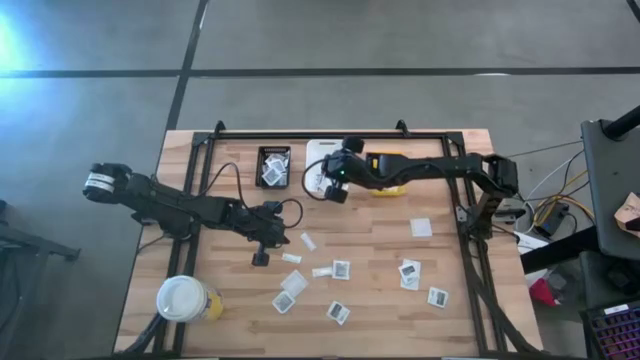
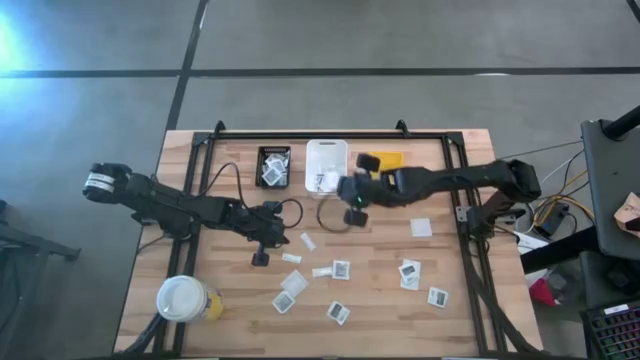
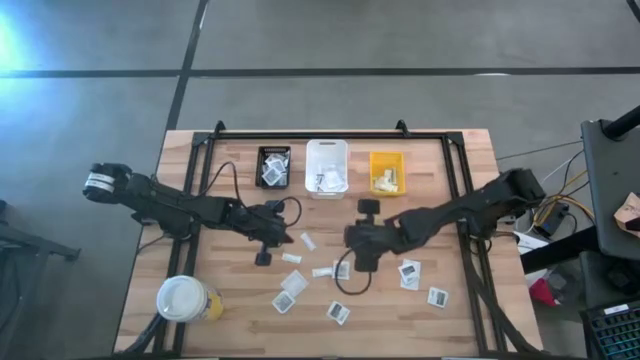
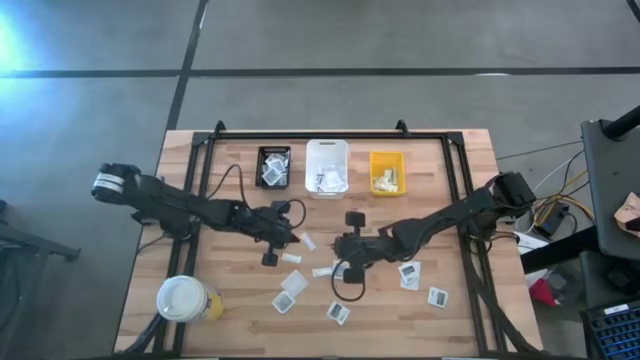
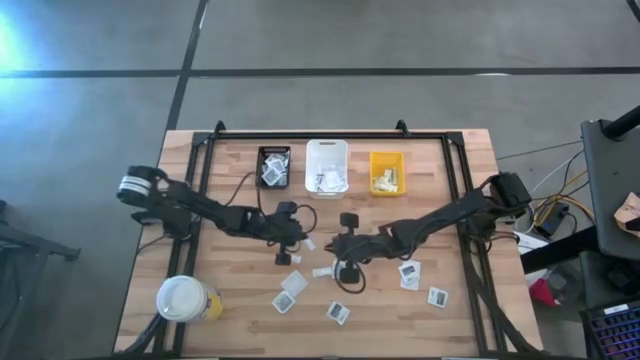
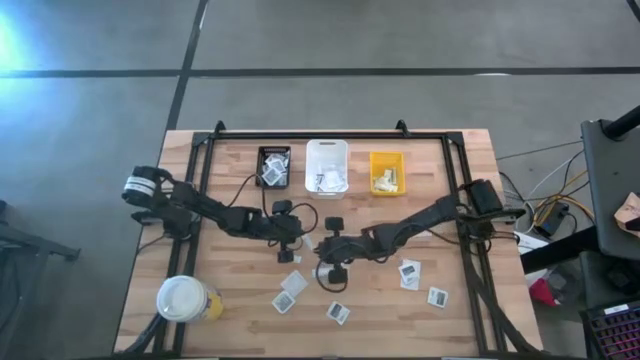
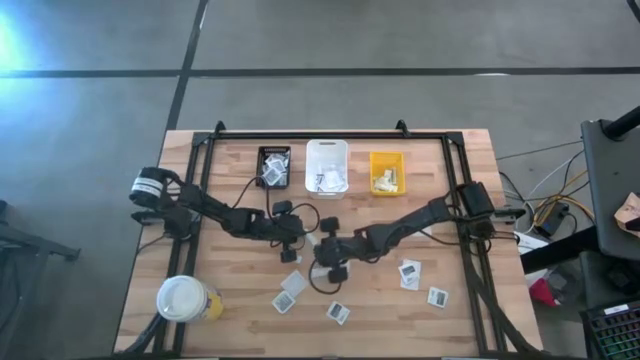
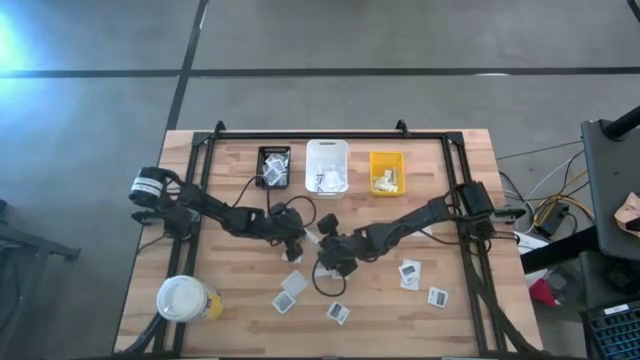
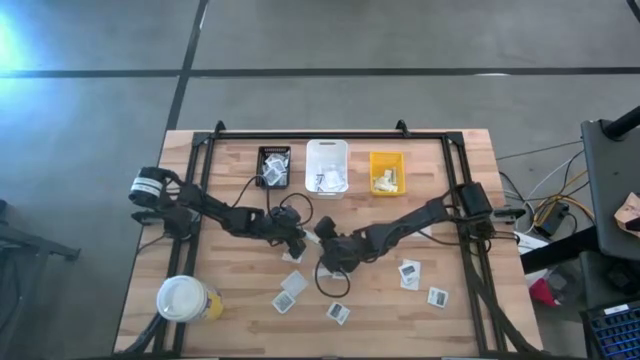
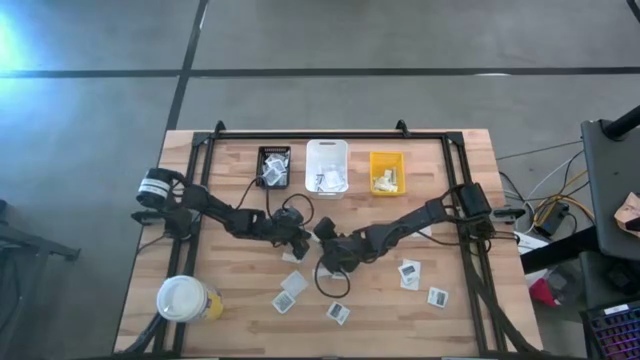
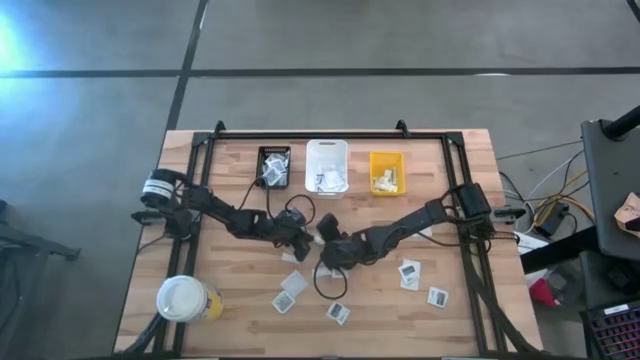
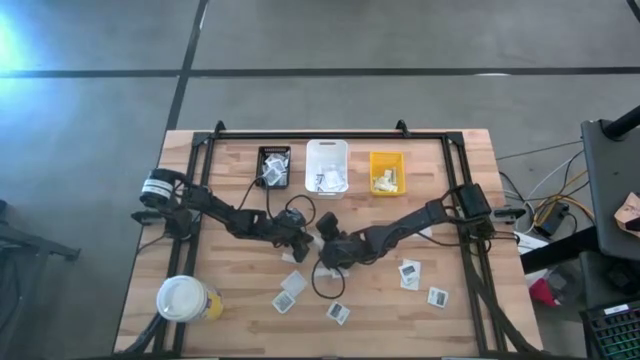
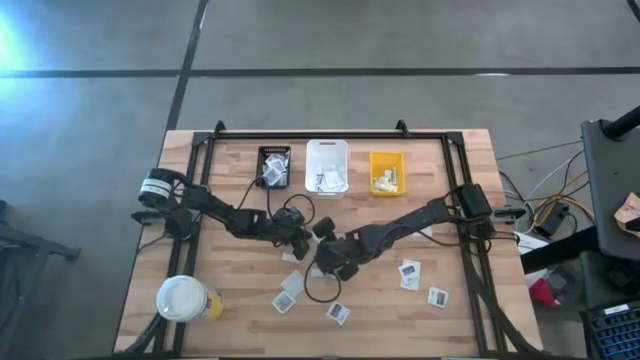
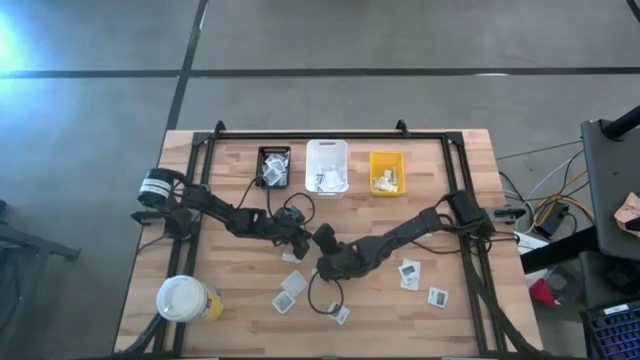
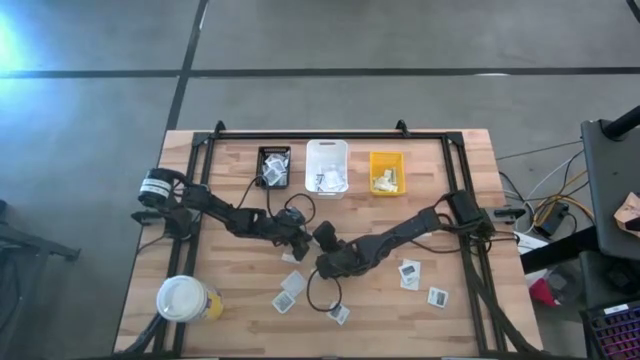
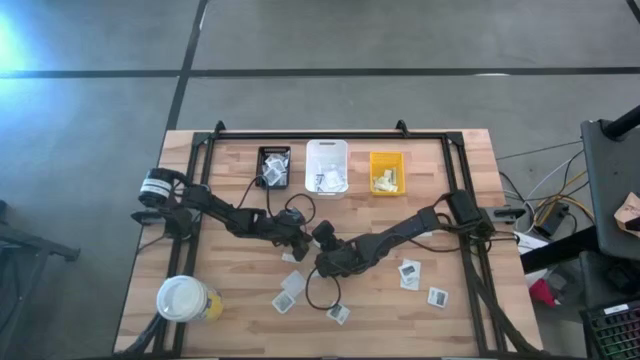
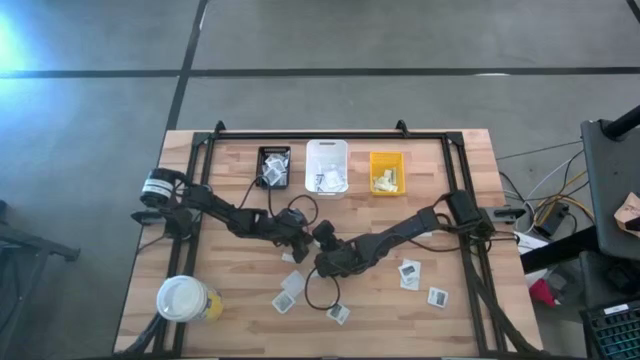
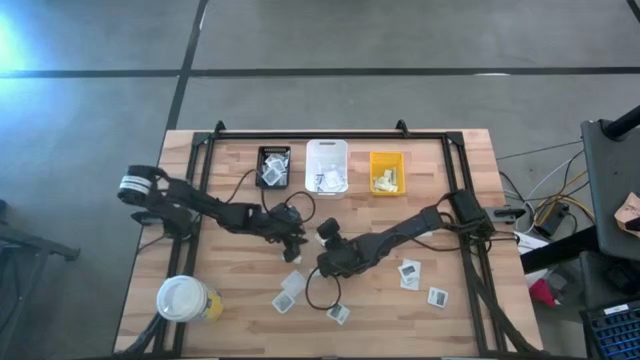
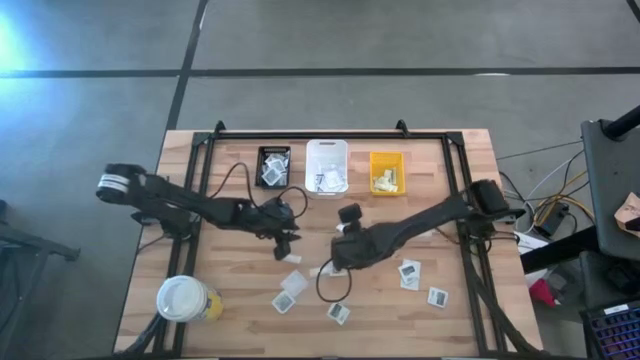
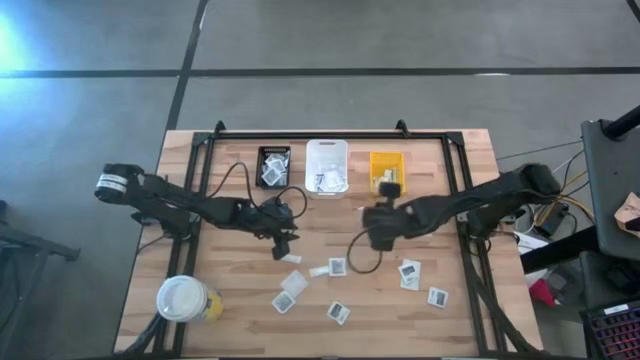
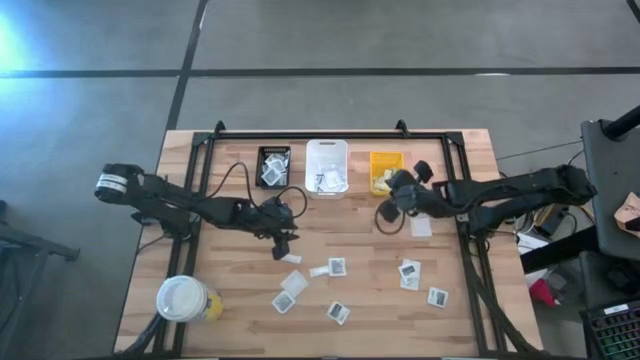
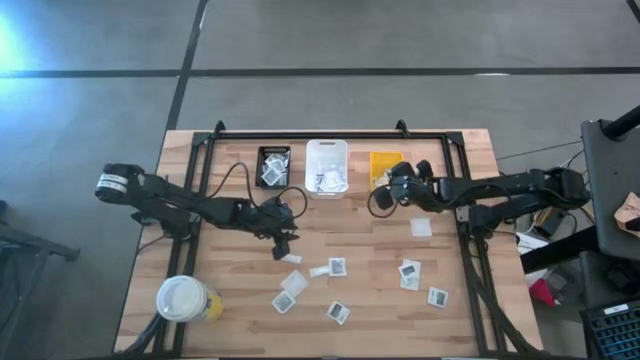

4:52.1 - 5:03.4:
Task: Pick & Place First Aid Supplies
Put the green bandage into the yellow basket

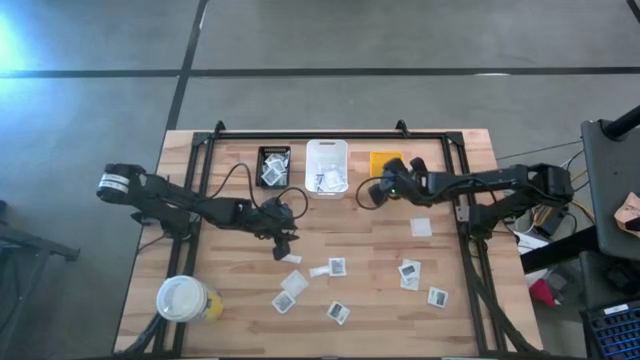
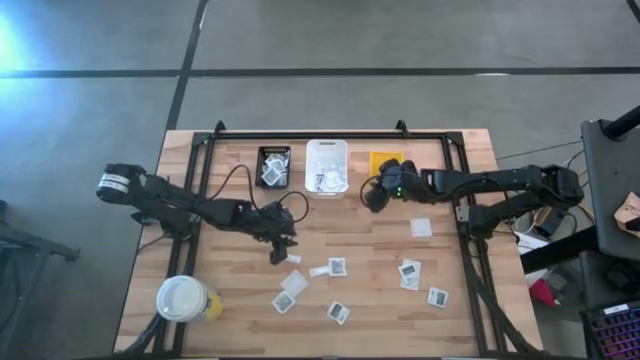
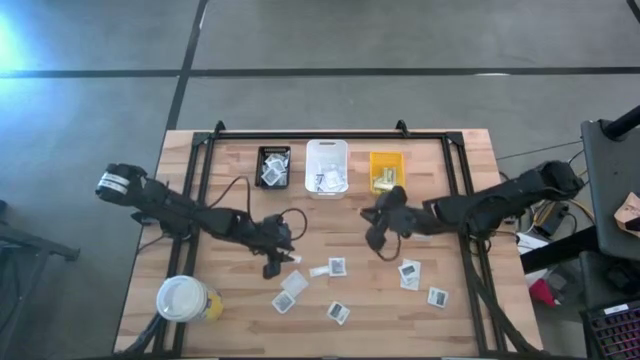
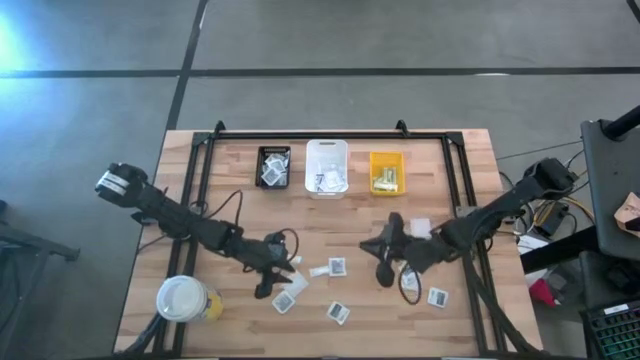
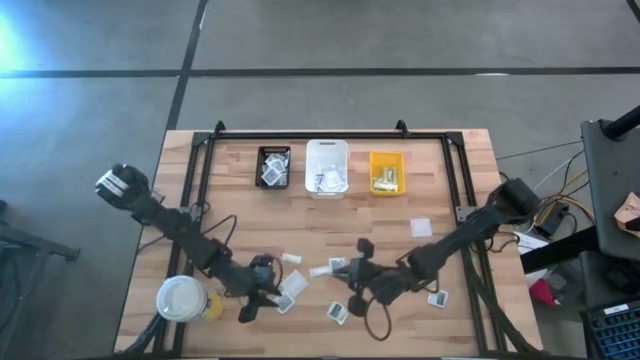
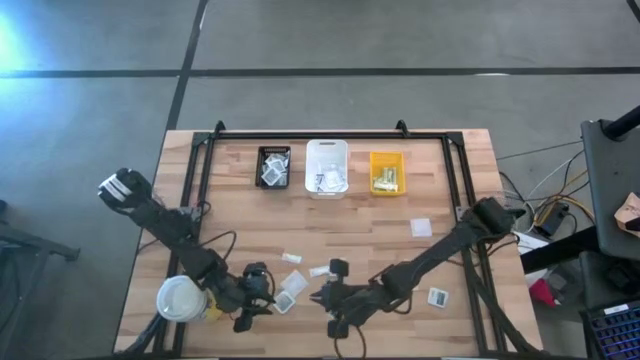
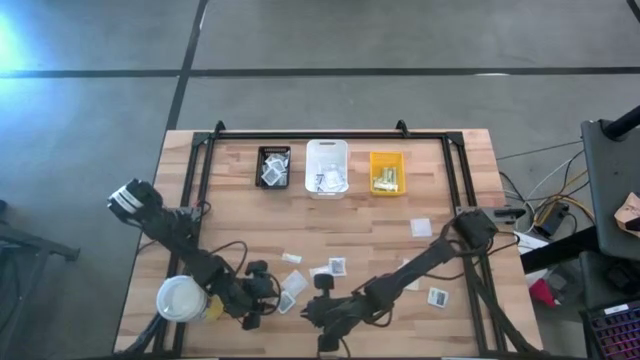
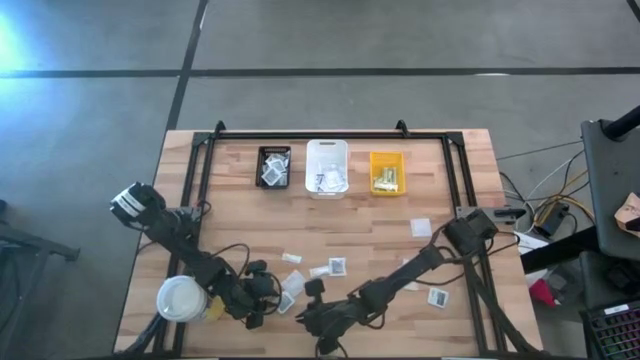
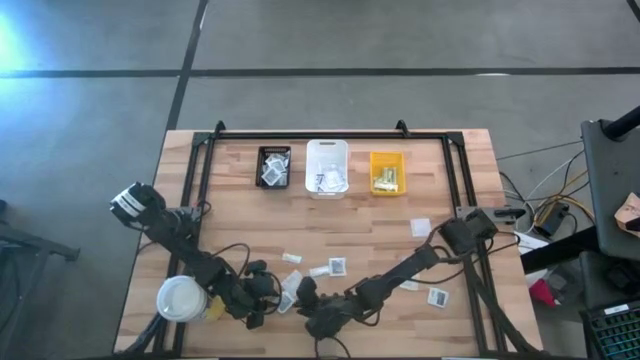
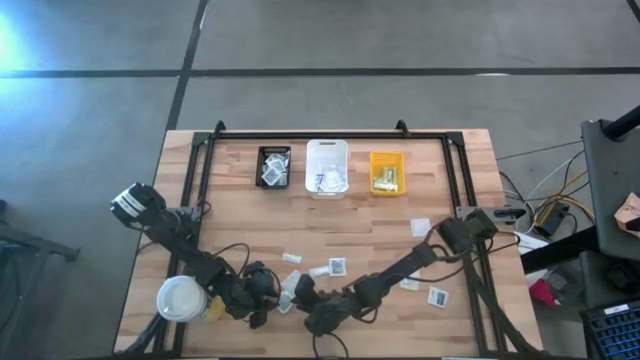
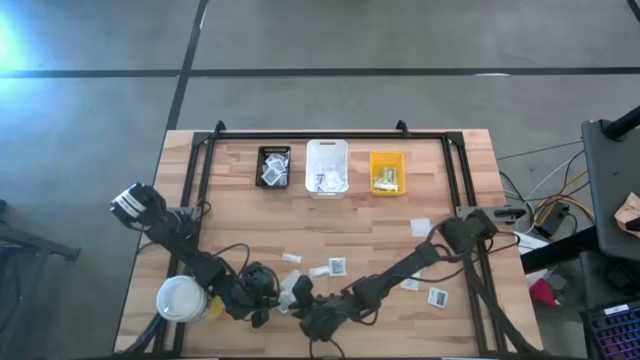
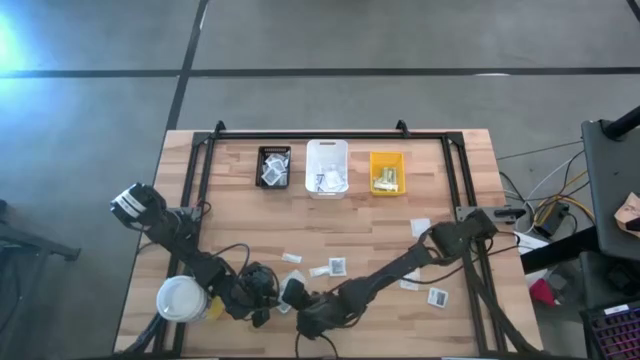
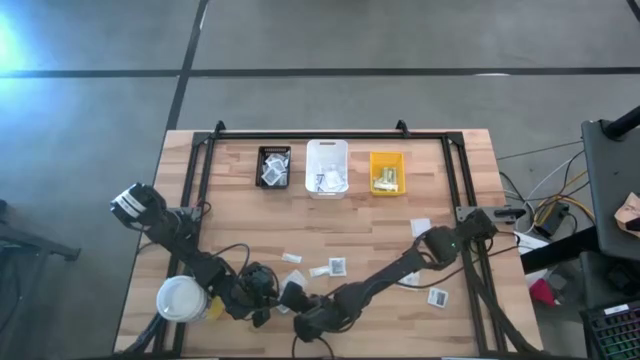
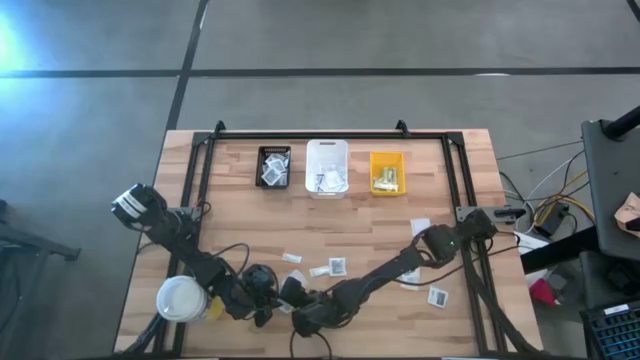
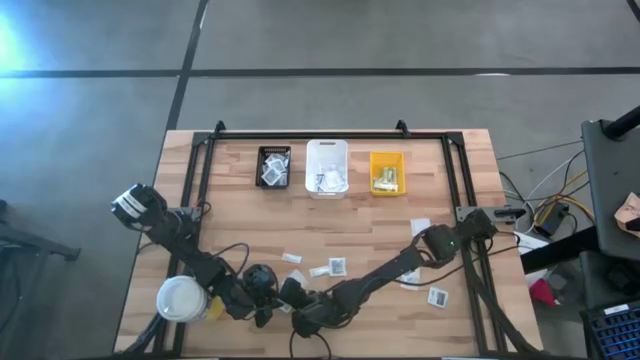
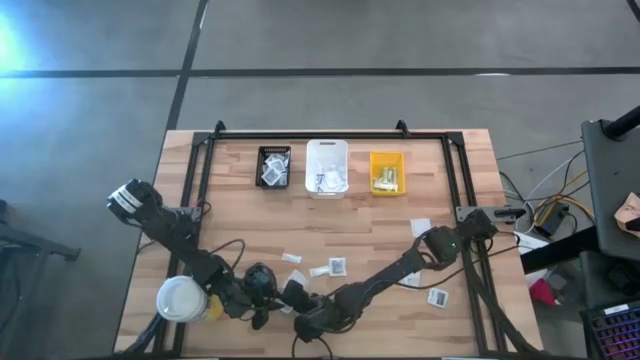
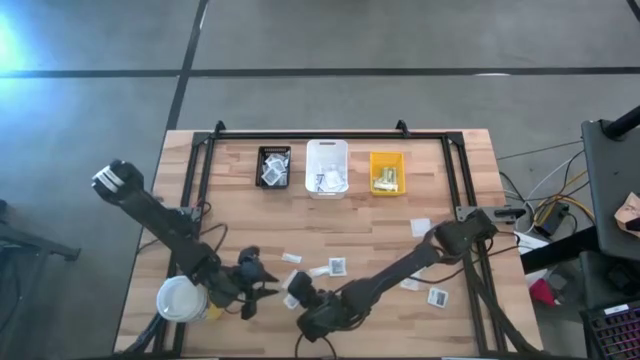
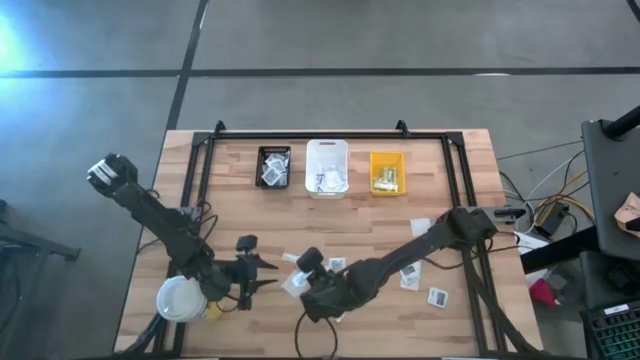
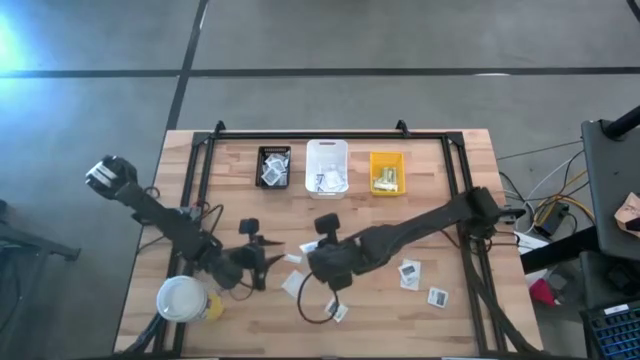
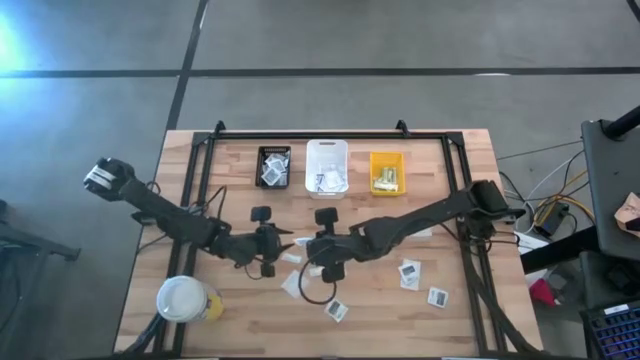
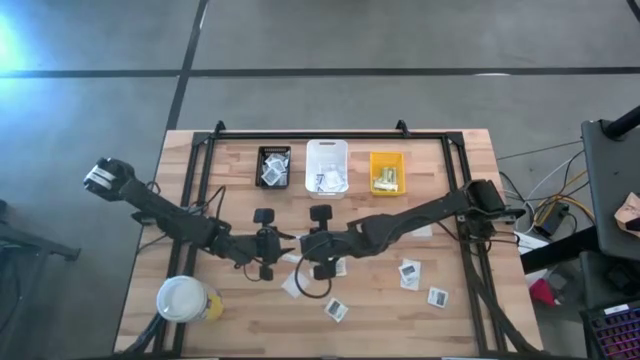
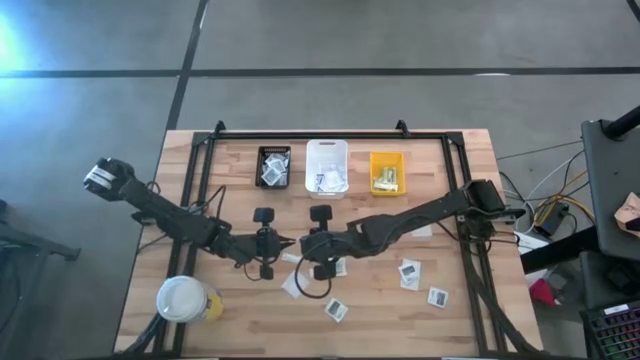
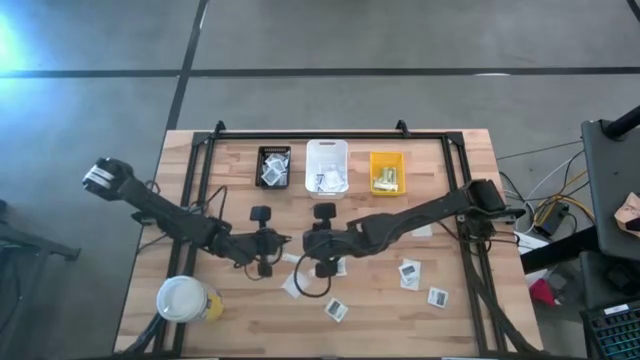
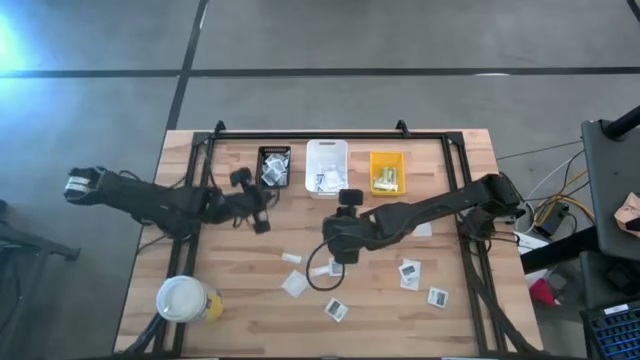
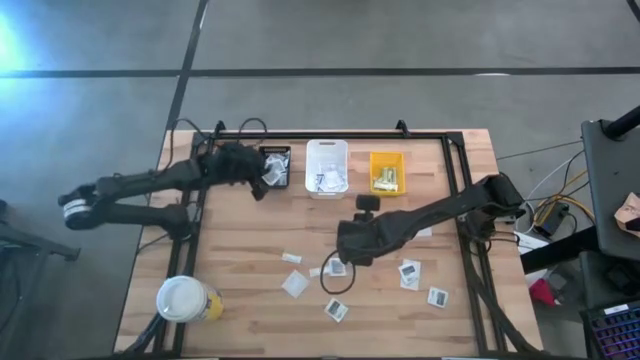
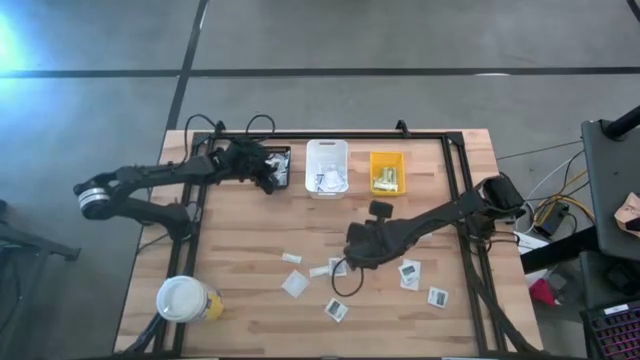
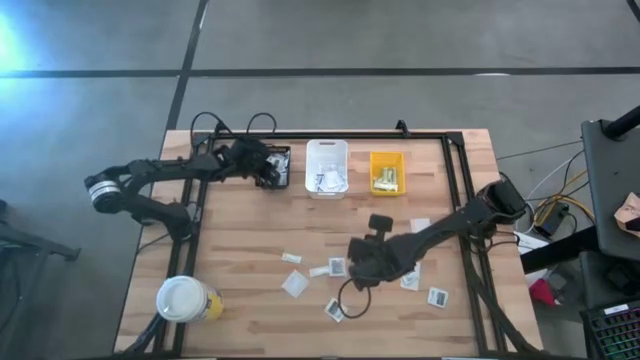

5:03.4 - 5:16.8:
Put the towelette pack into the black basket
